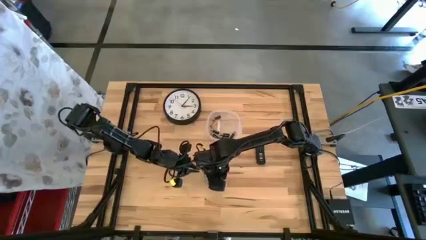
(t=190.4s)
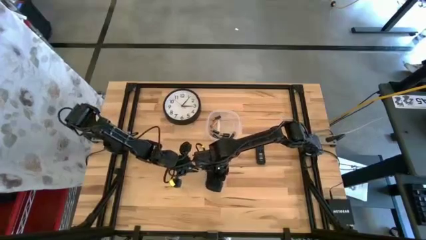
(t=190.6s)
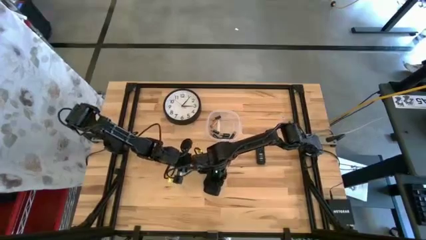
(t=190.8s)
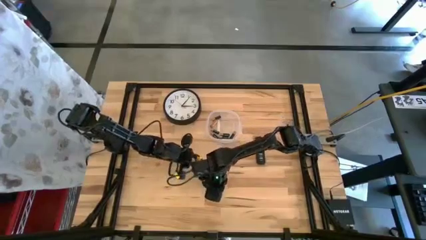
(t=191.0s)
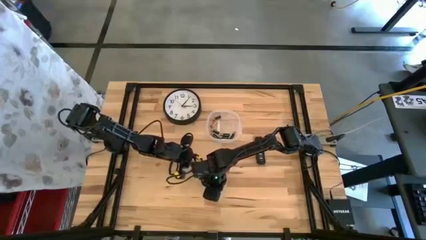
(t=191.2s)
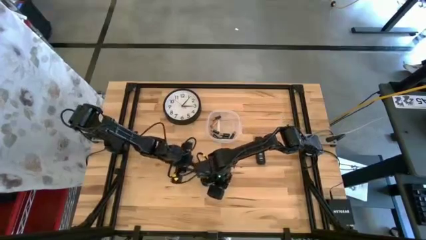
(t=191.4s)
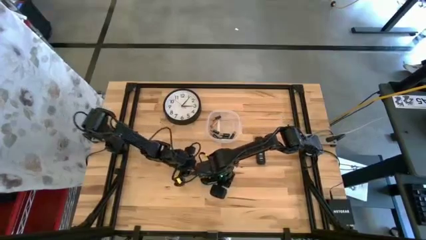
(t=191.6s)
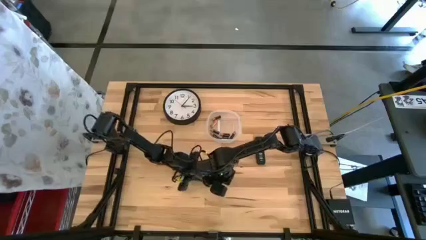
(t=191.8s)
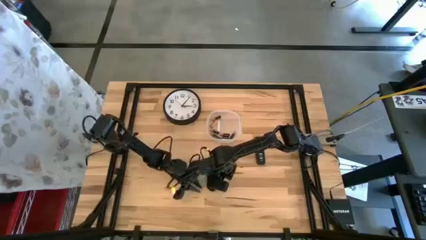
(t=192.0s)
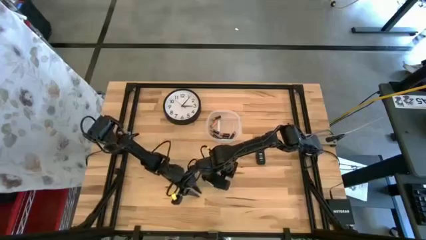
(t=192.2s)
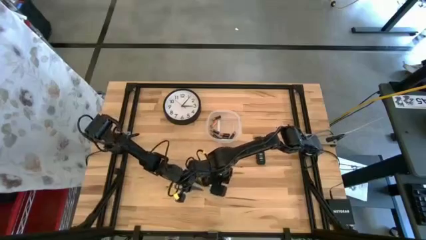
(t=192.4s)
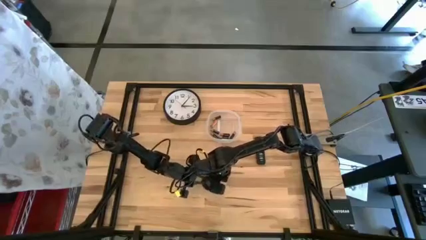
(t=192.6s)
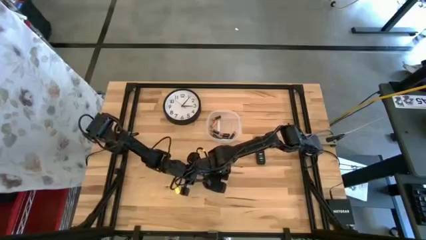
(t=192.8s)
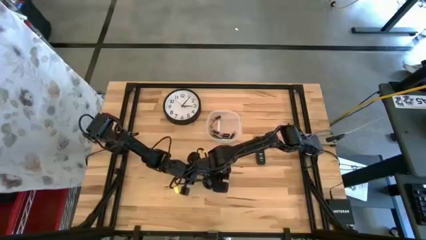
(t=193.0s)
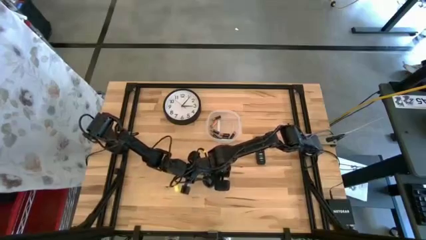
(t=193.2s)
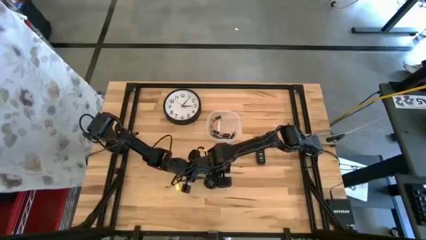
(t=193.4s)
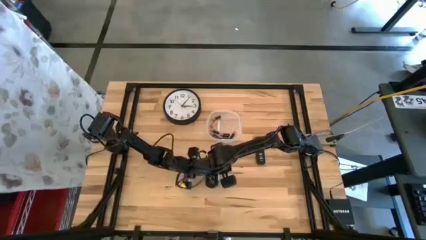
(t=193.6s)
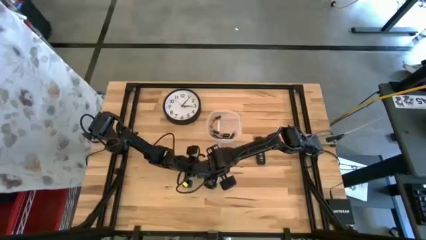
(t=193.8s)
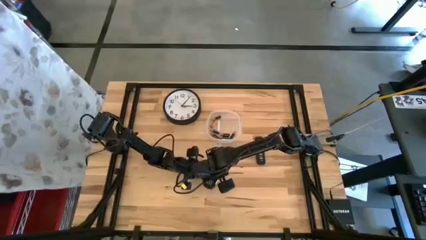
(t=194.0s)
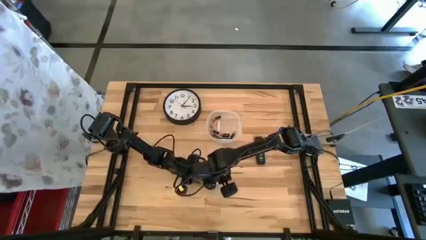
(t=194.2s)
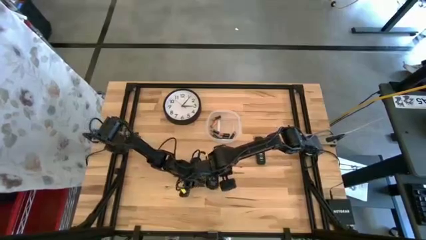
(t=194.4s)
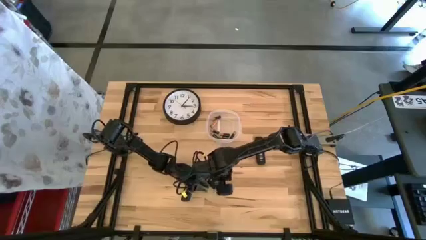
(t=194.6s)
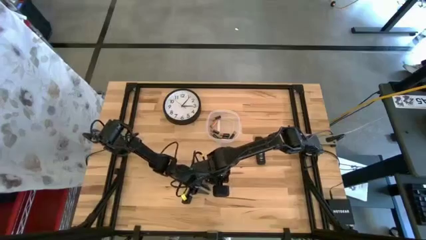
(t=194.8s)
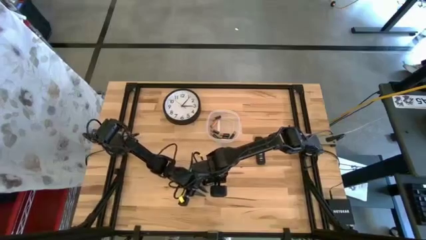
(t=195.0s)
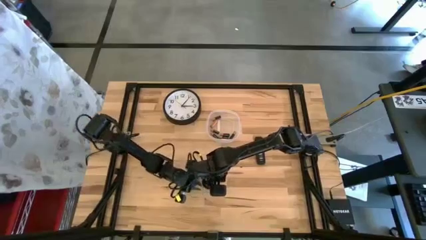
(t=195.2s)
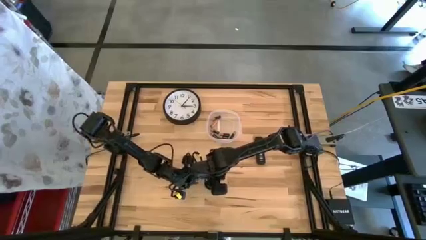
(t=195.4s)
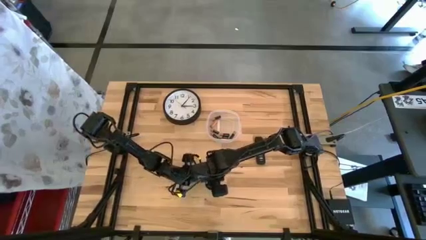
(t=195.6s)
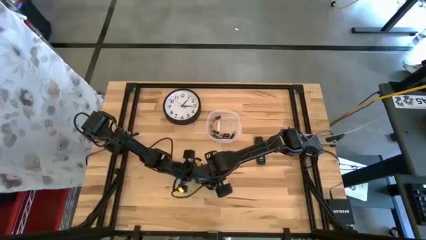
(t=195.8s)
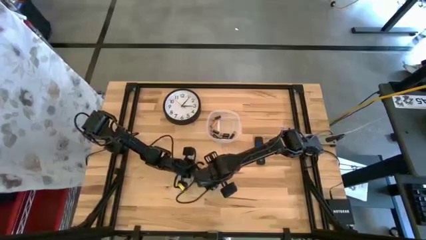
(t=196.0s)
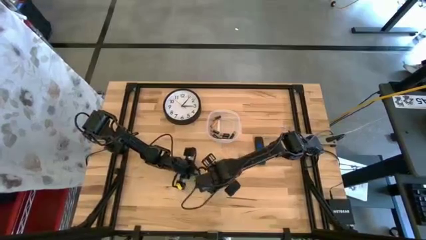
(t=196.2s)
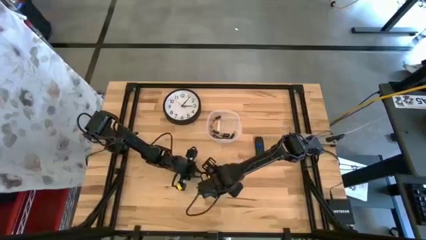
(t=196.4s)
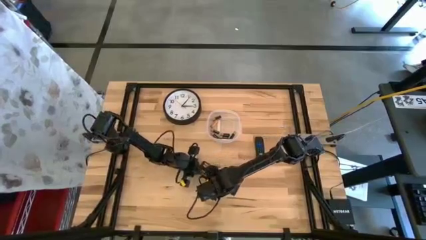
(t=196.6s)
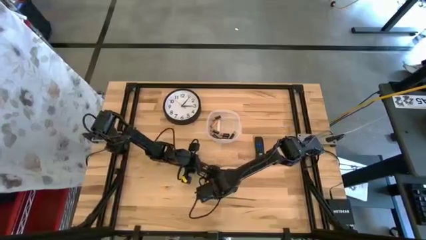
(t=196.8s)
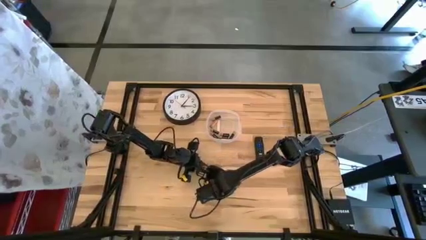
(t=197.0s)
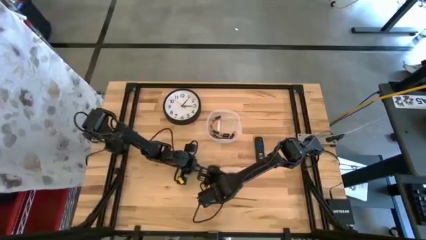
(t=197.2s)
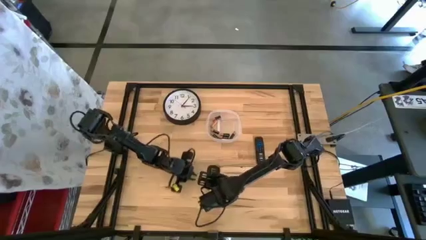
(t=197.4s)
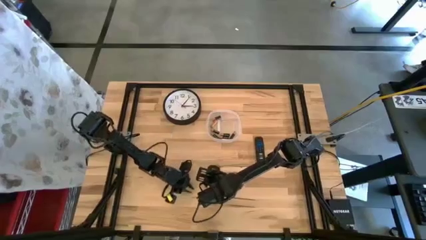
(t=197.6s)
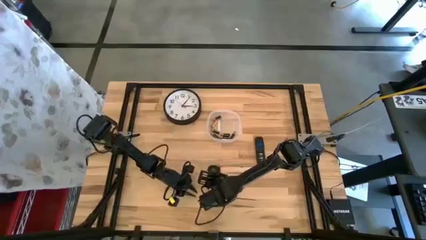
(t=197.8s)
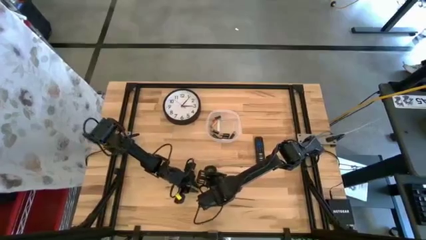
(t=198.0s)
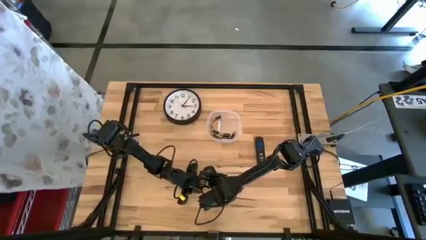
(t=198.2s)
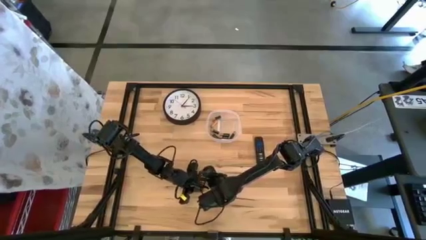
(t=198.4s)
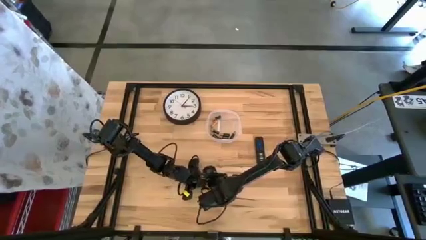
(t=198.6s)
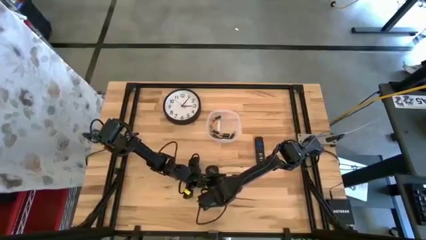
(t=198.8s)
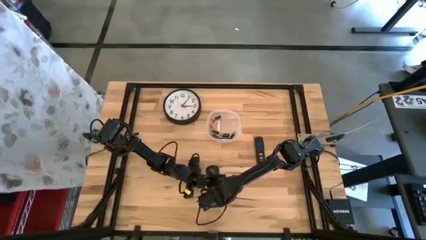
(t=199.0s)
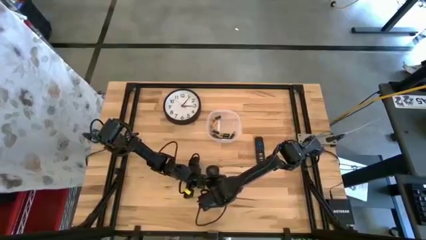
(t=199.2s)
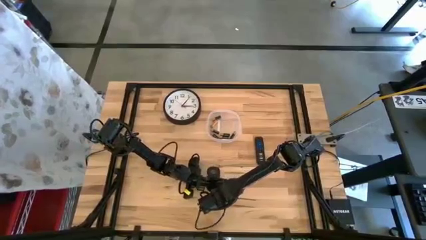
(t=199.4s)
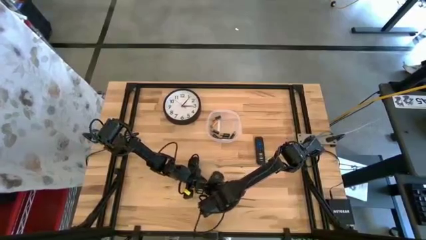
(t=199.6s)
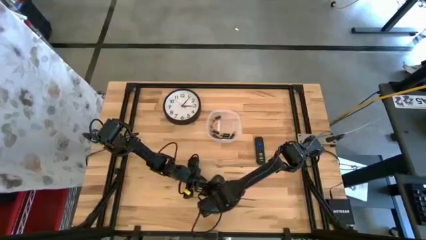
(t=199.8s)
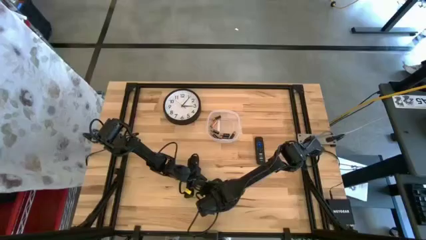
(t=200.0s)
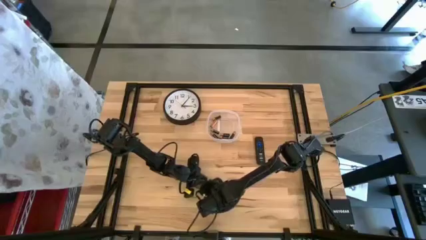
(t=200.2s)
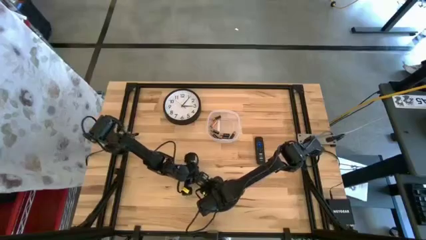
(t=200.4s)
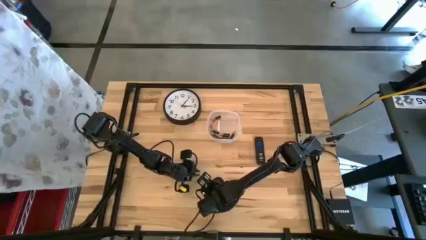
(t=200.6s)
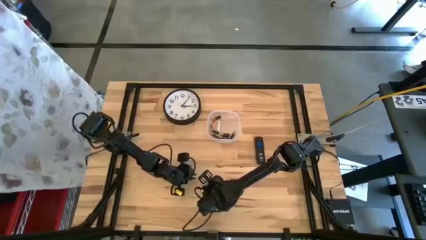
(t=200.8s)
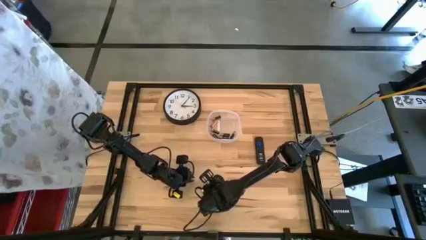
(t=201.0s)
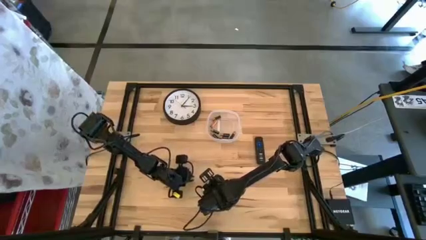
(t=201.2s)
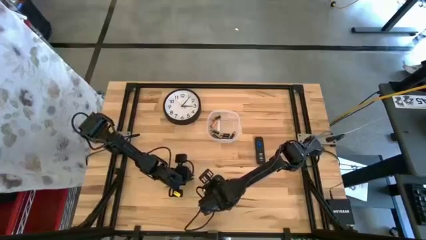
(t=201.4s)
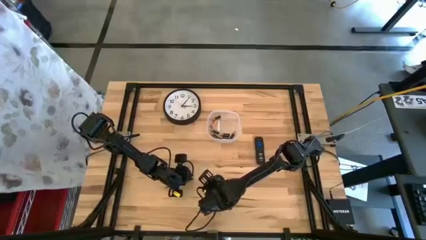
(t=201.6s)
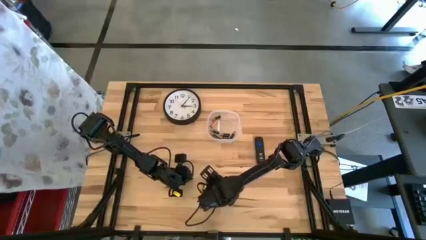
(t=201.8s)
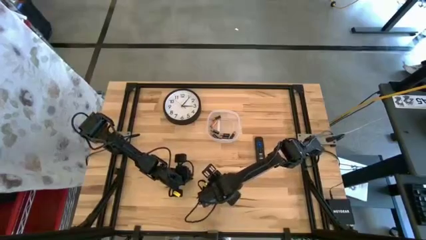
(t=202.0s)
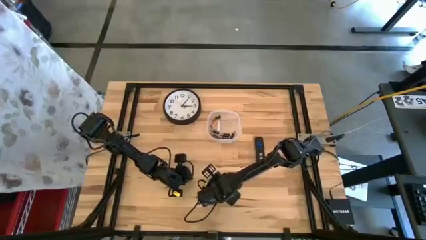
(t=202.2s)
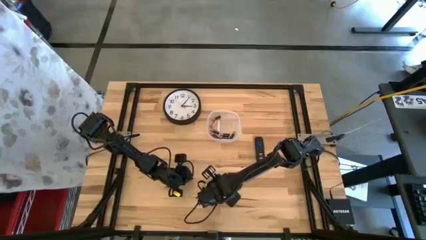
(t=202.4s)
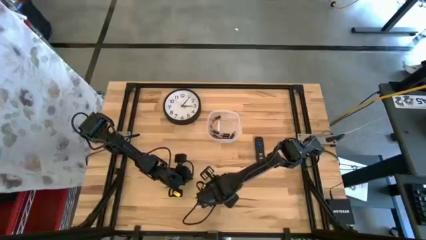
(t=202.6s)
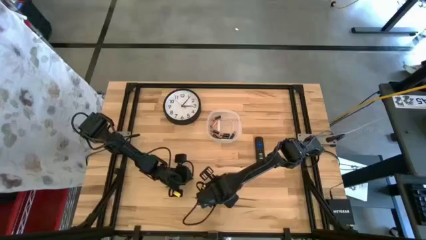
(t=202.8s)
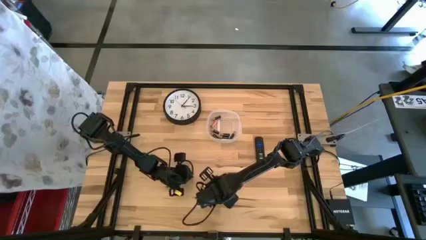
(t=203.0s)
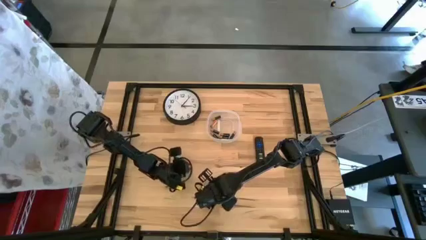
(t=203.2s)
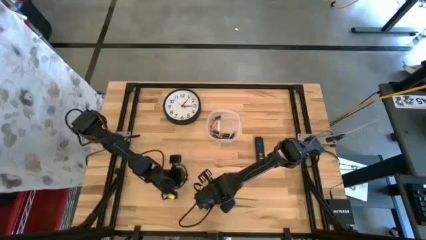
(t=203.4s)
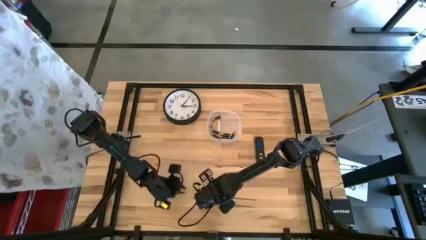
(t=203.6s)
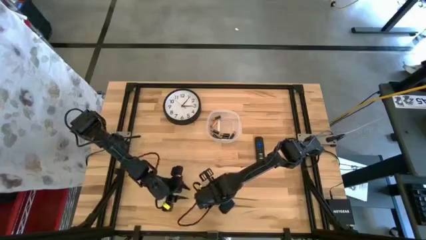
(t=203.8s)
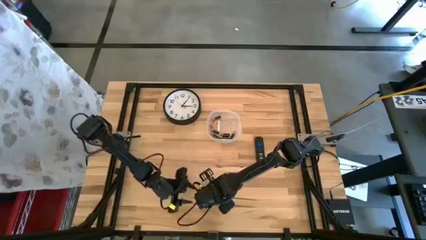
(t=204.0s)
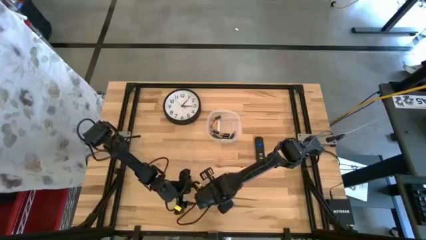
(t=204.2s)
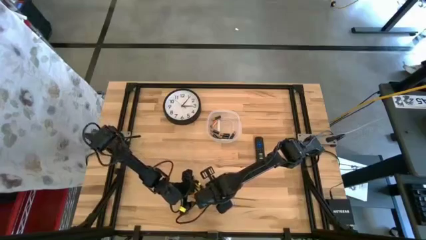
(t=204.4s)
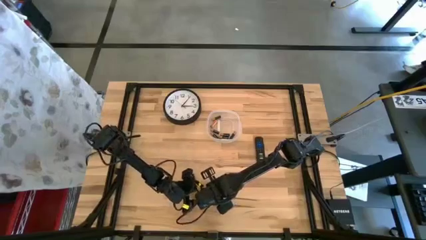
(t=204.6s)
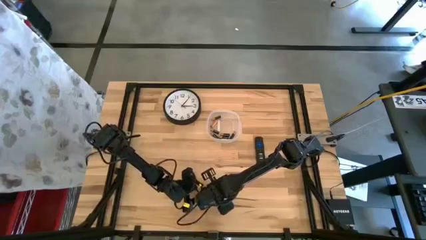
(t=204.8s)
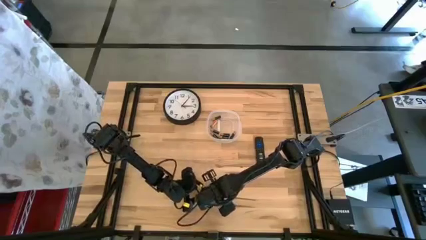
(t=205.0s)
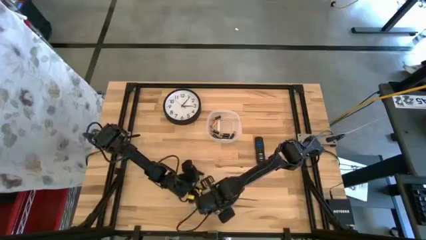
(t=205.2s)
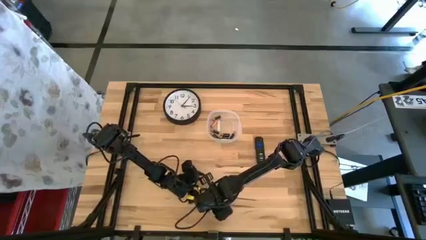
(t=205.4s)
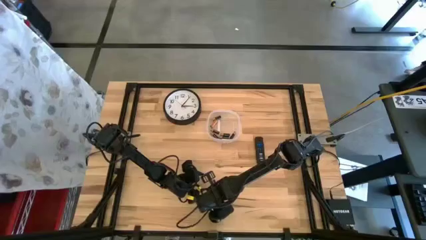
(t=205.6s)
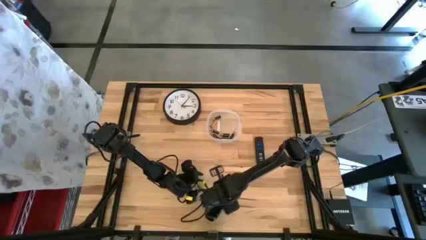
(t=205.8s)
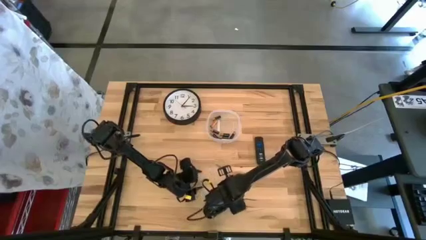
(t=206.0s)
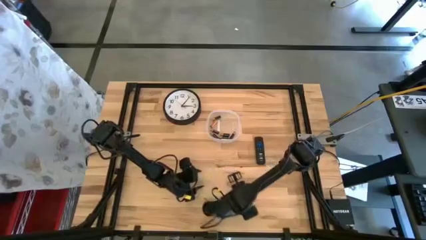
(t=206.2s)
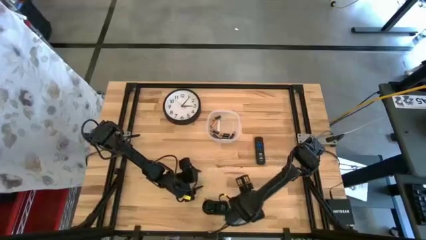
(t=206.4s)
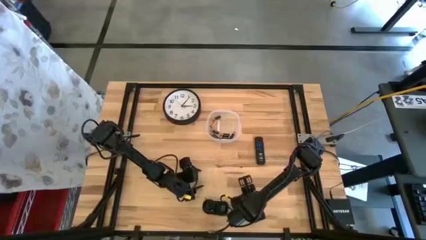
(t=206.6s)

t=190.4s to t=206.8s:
Task: Insert battery
Insert the silver battery into the computer mouse
